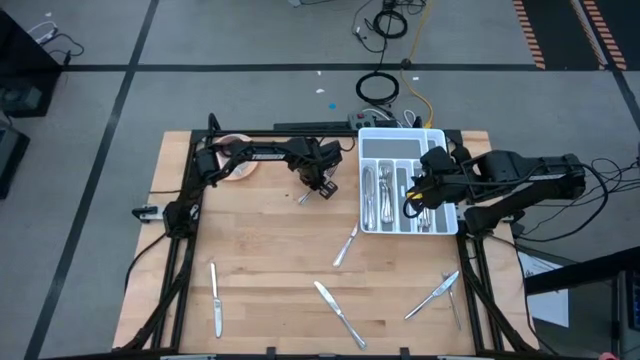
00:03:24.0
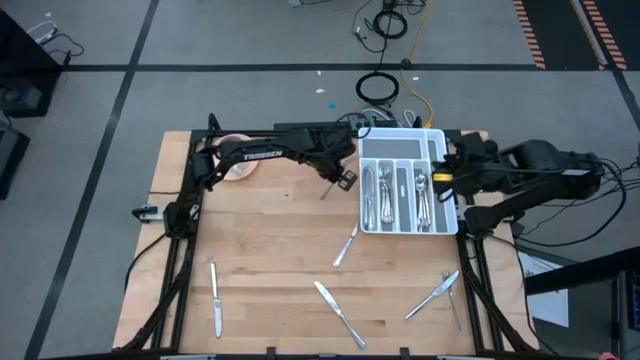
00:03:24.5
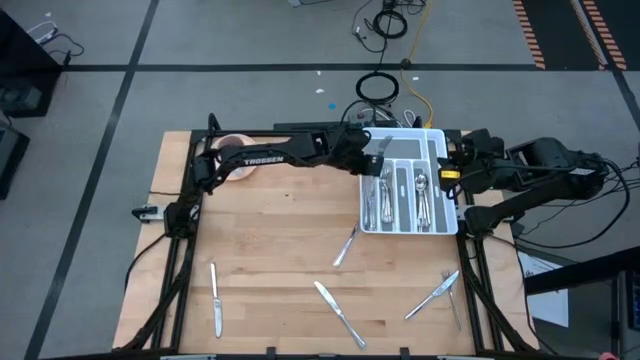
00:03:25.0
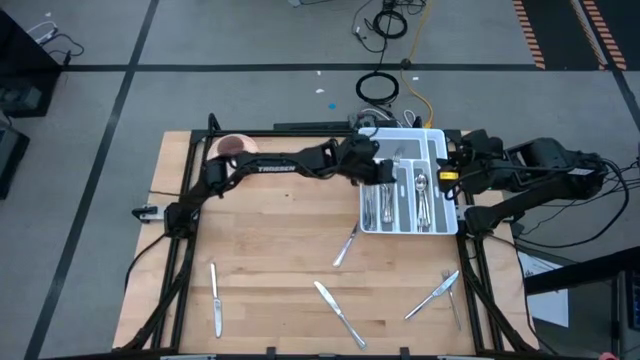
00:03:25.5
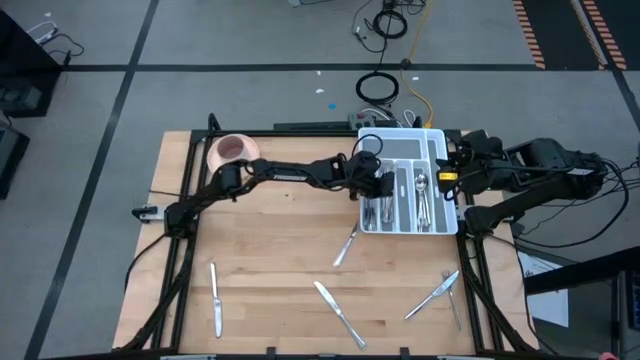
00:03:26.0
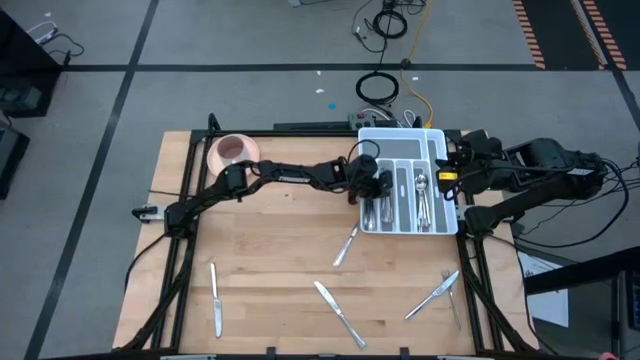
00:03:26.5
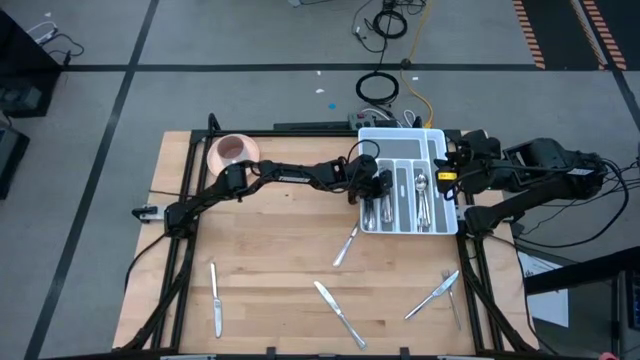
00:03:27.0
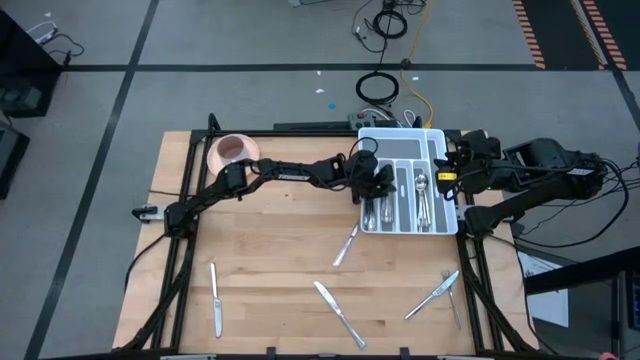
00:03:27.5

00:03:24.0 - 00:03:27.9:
Task: Sort silverware
Put the silver fork into the white silverware tray

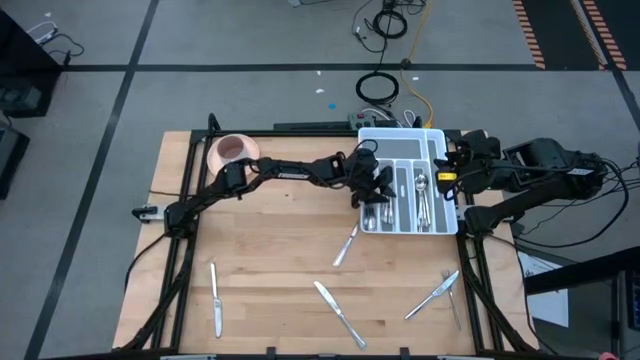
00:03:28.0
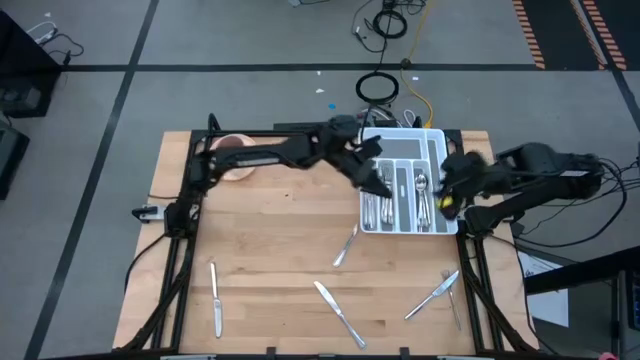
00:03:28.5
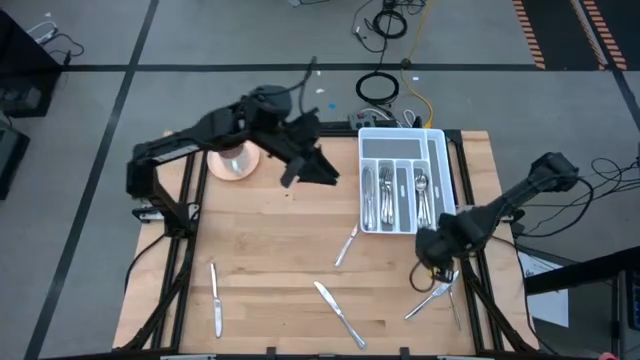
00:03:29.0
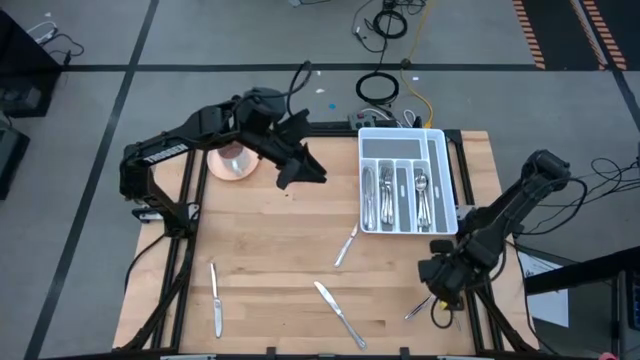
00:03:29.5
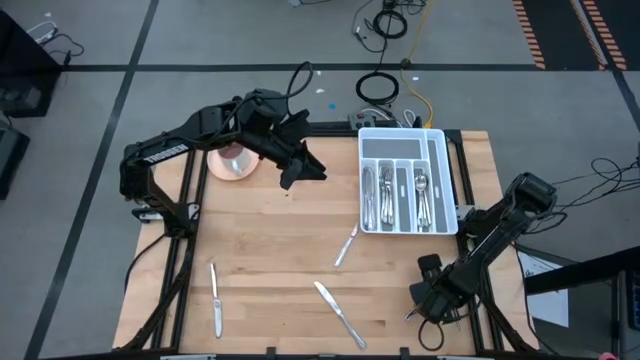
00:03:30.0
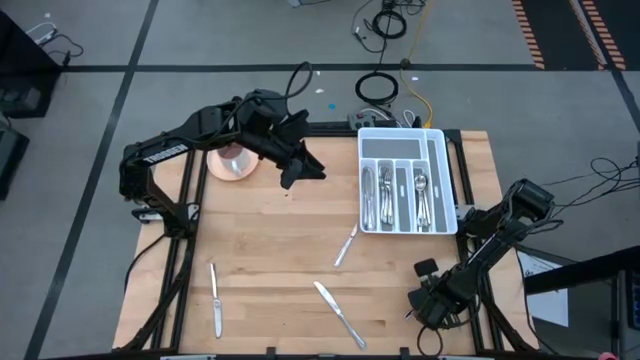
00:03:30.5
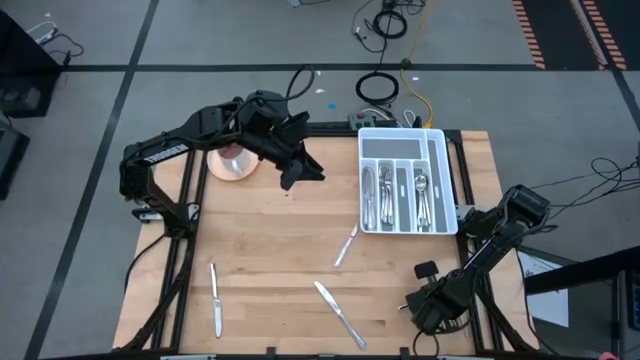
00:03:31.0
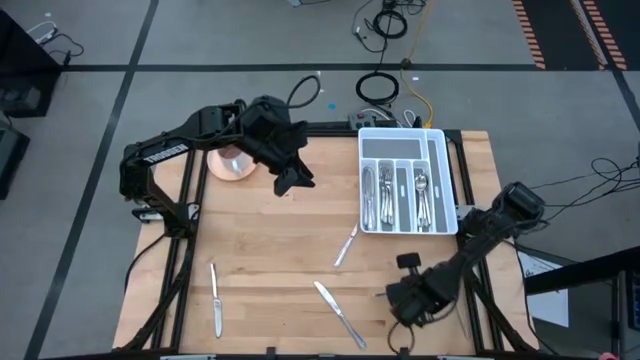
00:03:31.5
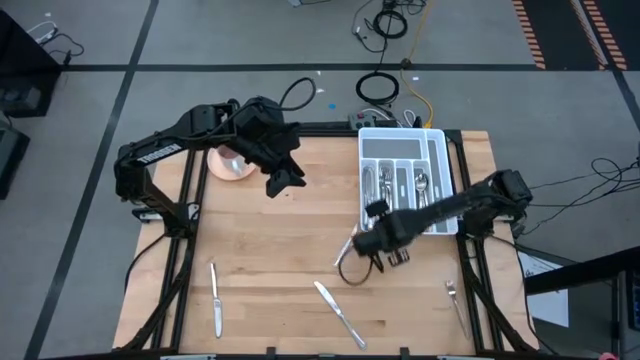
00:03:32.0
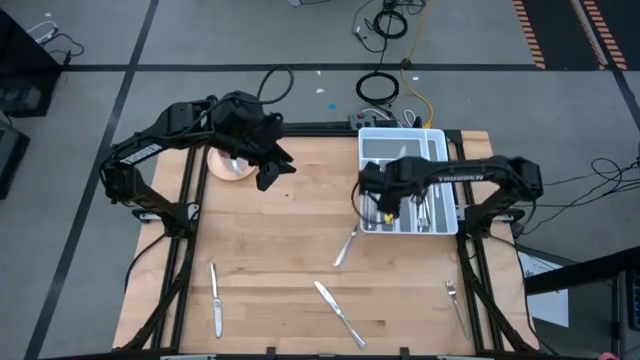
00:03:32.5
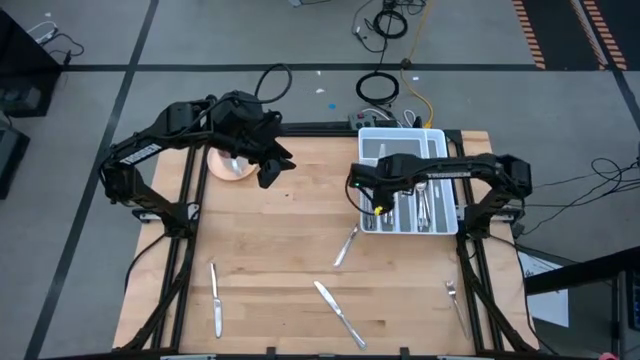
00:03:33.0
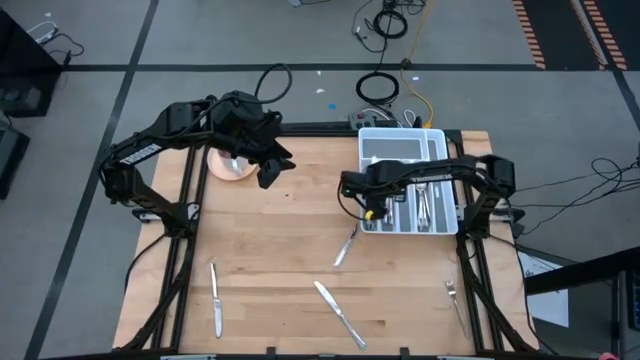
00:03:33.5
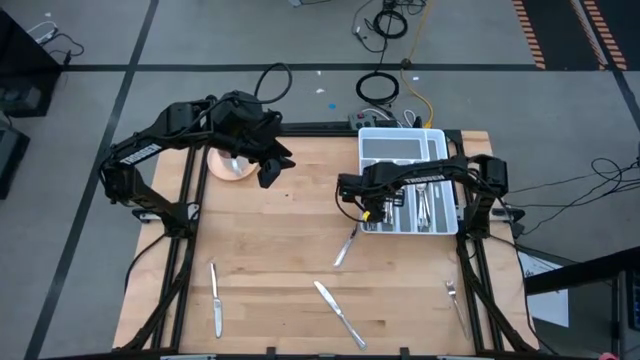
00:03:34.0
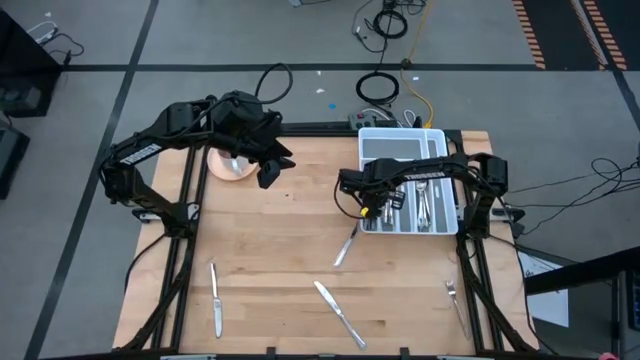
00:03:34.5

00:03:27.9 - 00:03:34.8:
Put the silver table knife into the white silverware tray

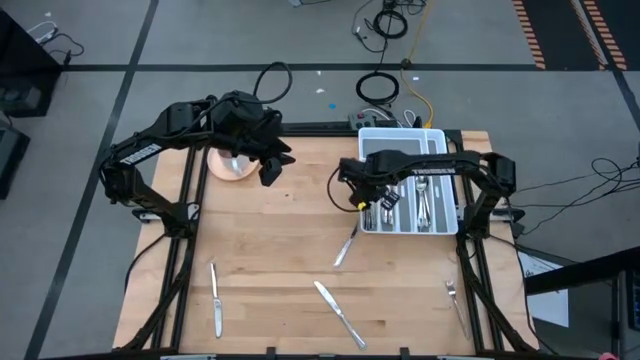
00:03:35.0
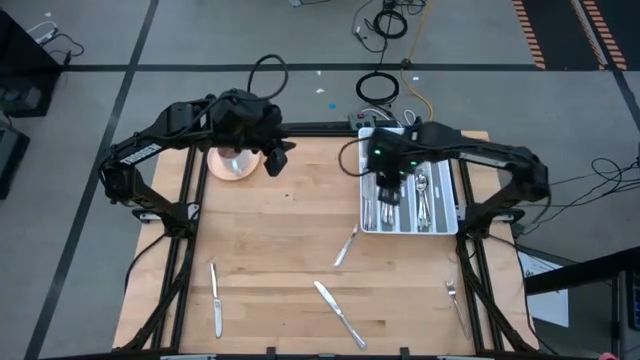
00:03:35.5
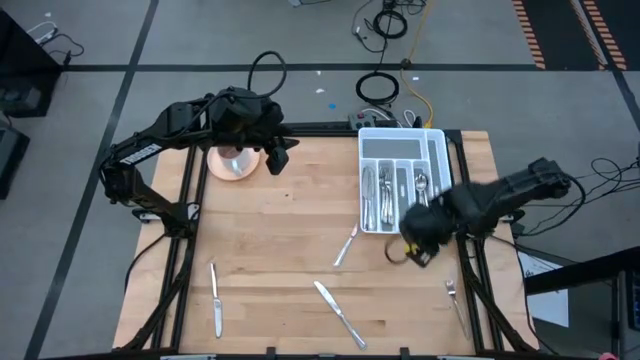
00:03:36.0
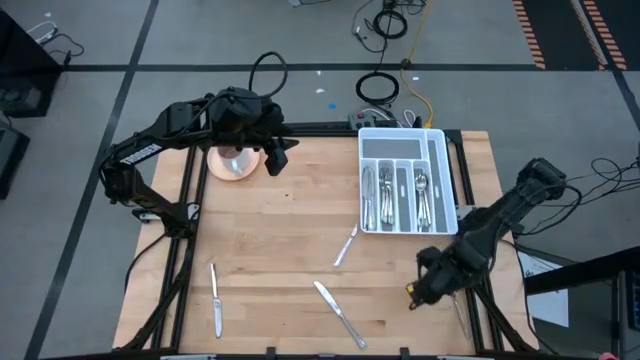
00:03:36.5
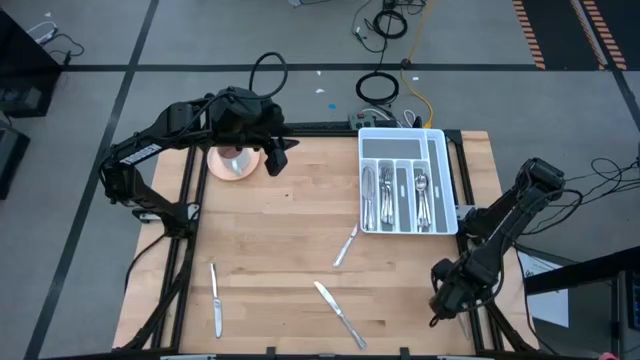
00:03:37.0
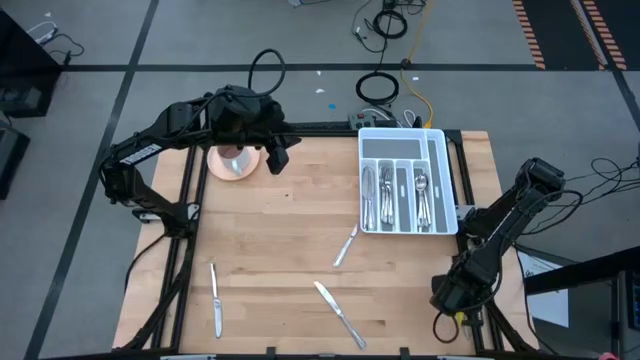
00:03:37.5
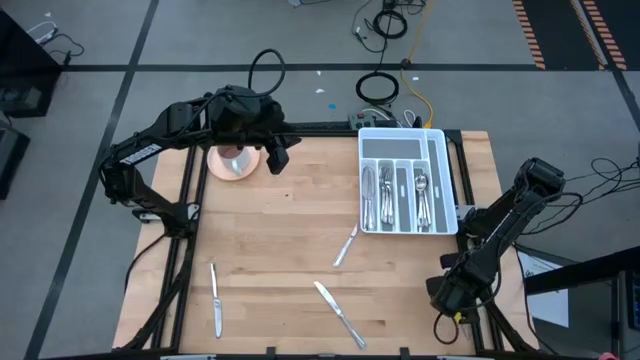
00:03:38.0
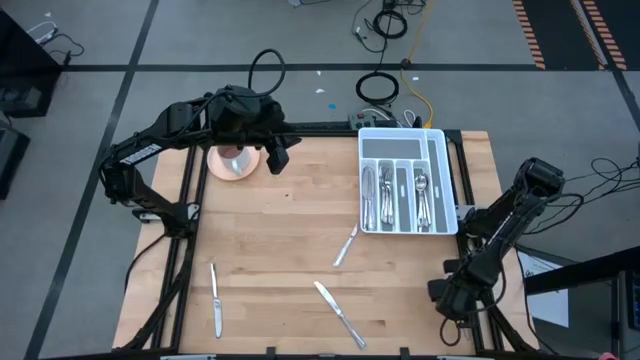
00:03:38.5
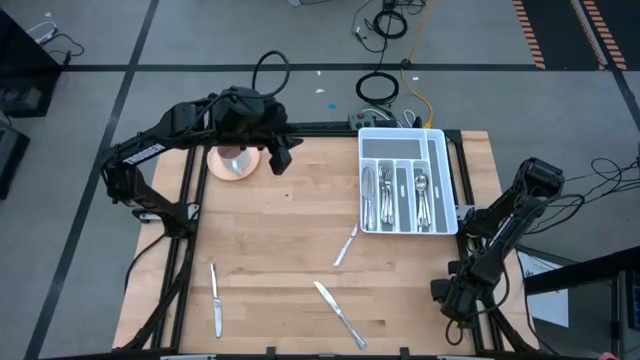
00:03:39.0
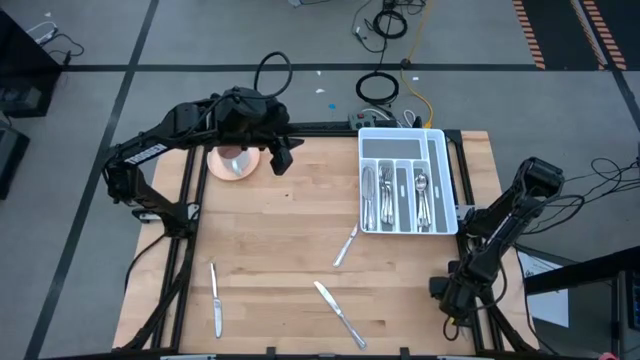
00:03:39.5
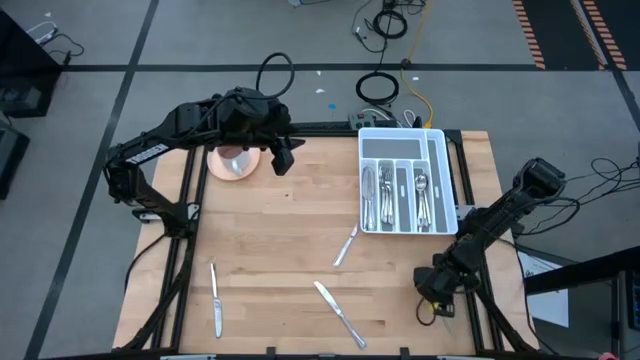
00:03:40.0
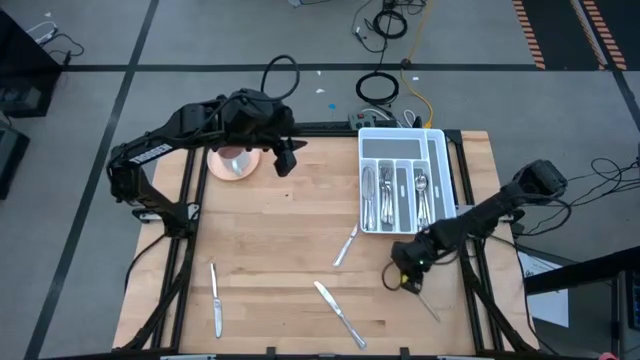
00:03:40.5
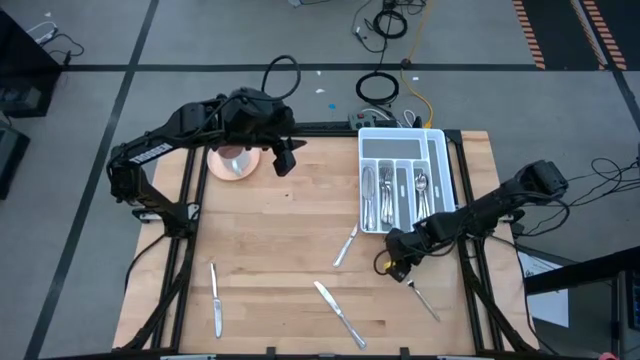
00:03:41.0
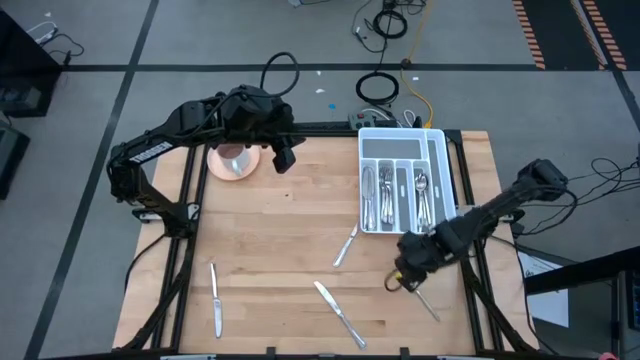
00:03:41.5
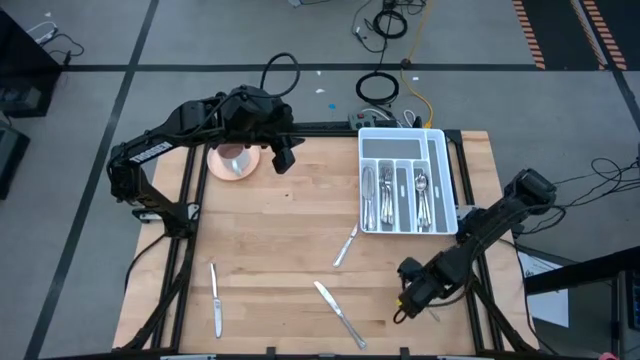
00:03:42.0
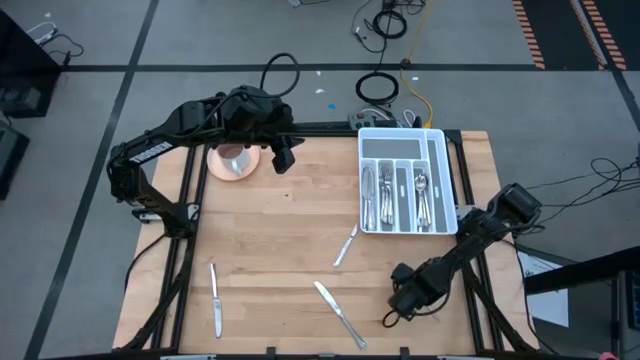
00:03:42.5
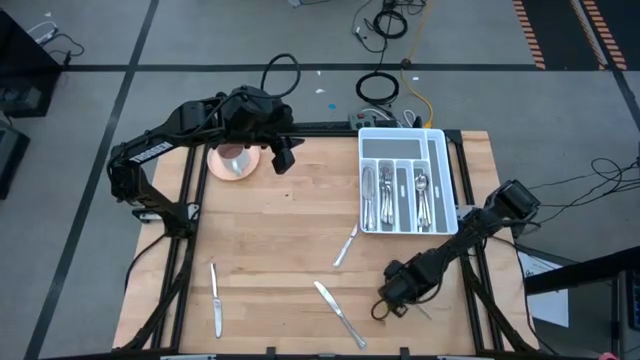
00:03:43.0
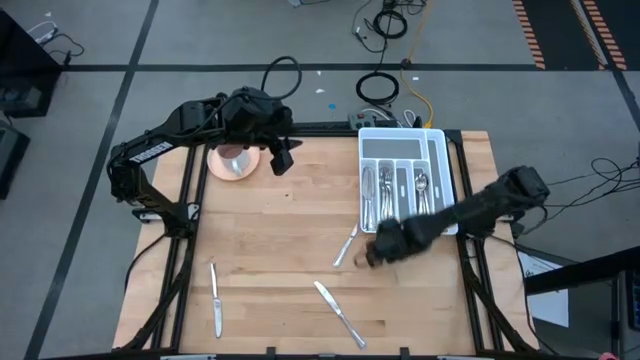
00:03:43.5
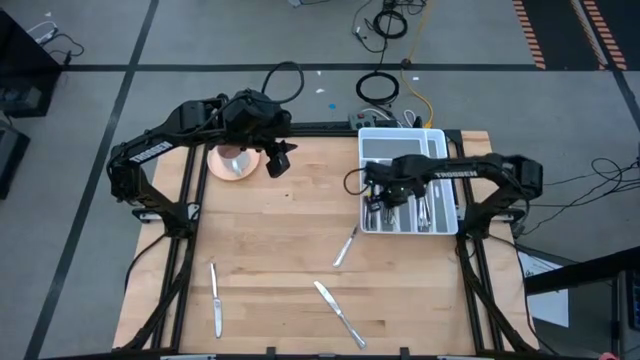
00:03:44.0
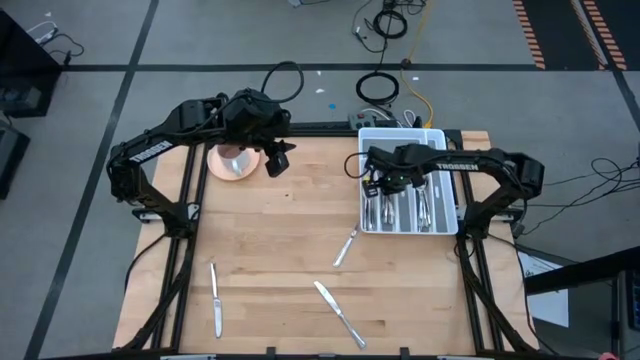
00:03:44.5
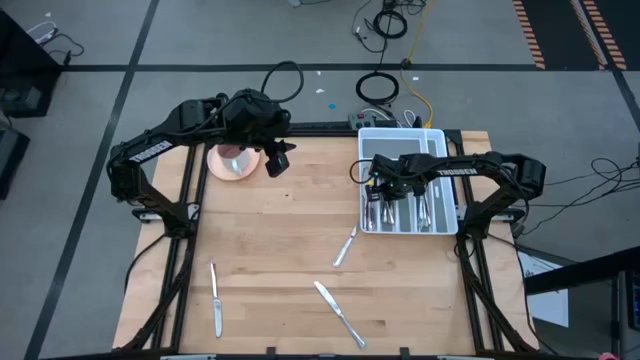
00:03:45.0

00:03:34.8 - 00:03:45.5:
Put the silver fork into the white silverware tray
